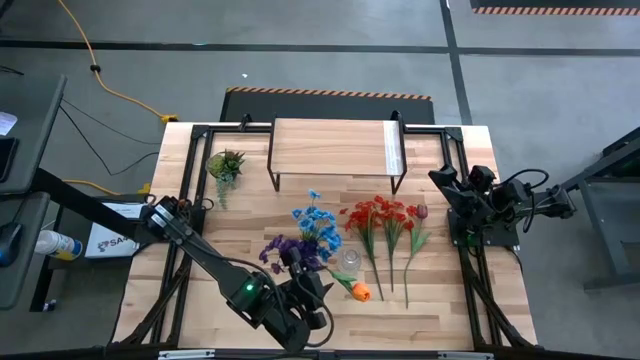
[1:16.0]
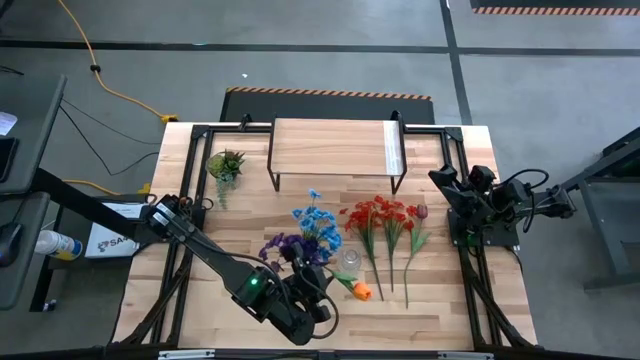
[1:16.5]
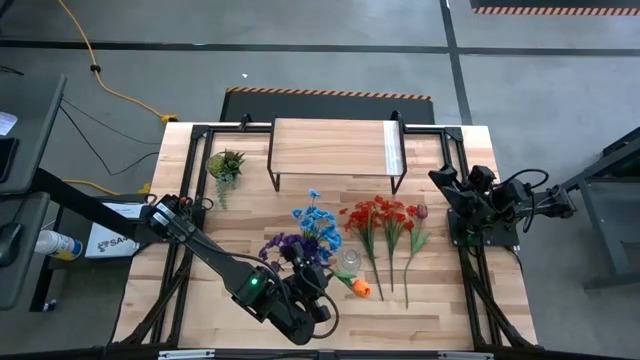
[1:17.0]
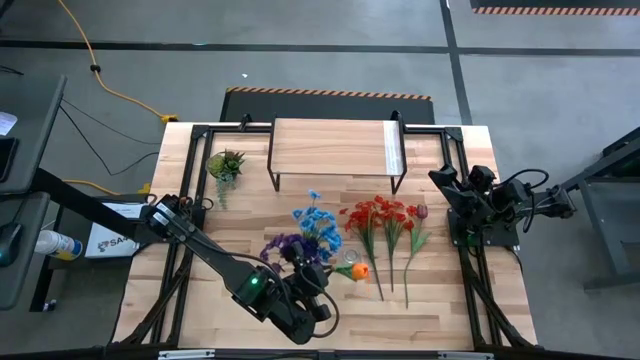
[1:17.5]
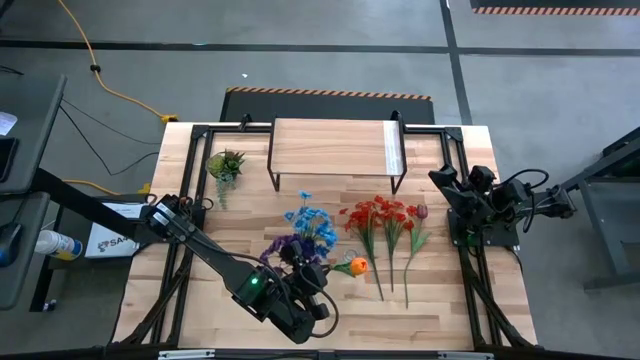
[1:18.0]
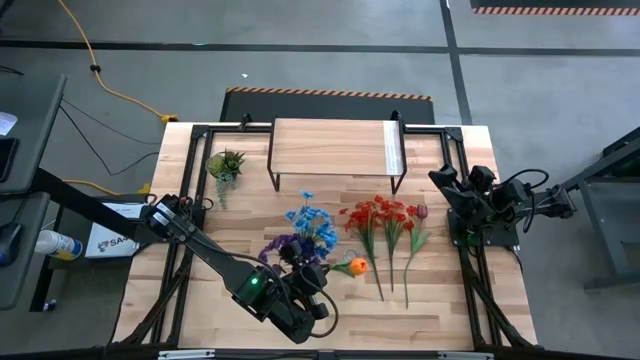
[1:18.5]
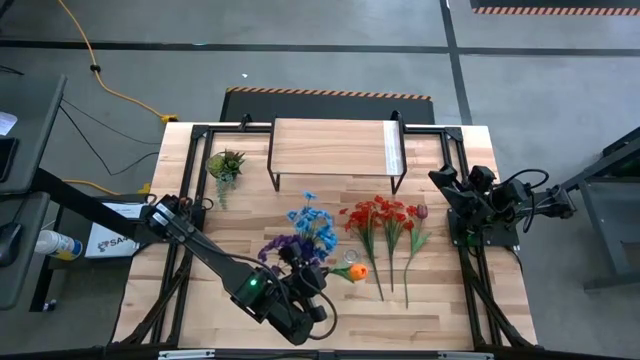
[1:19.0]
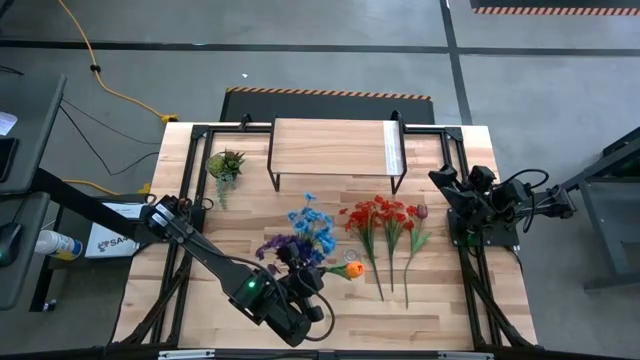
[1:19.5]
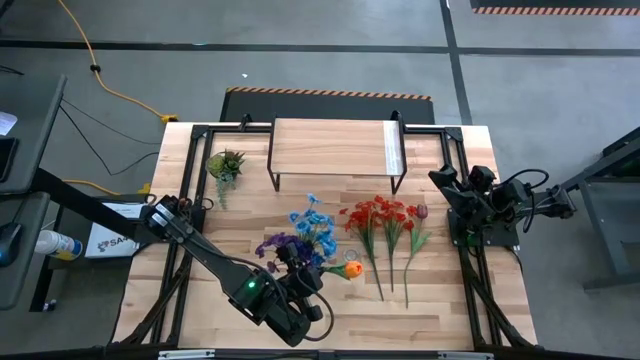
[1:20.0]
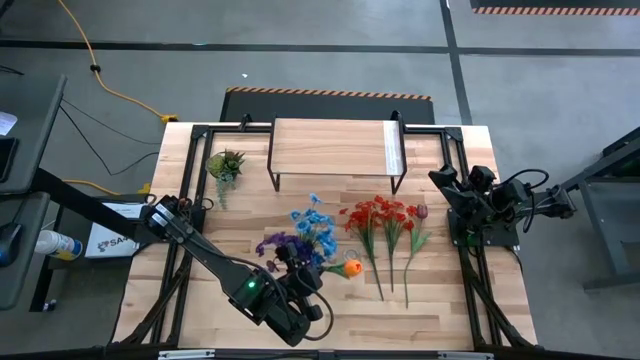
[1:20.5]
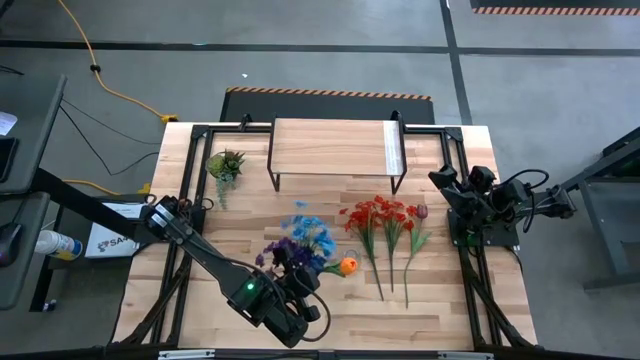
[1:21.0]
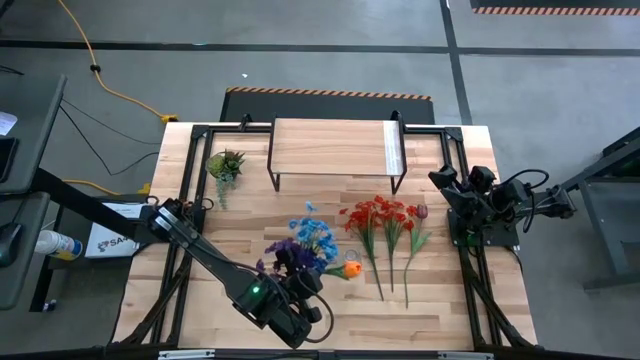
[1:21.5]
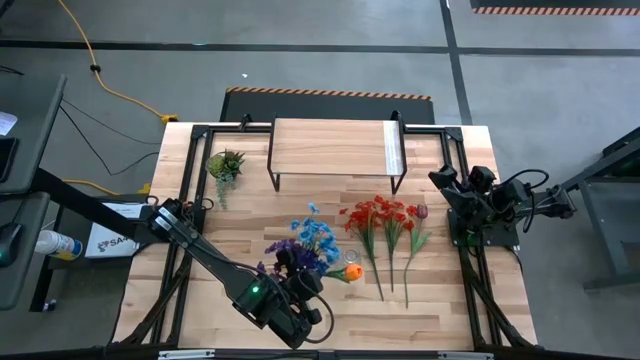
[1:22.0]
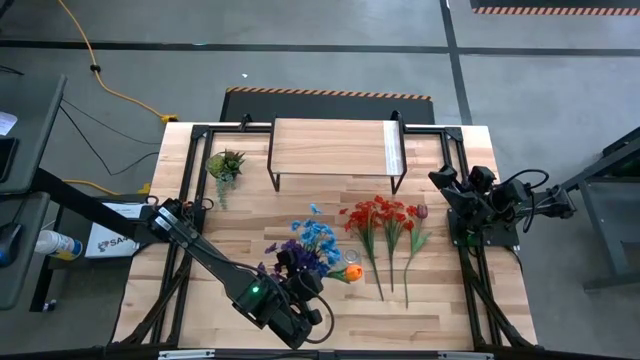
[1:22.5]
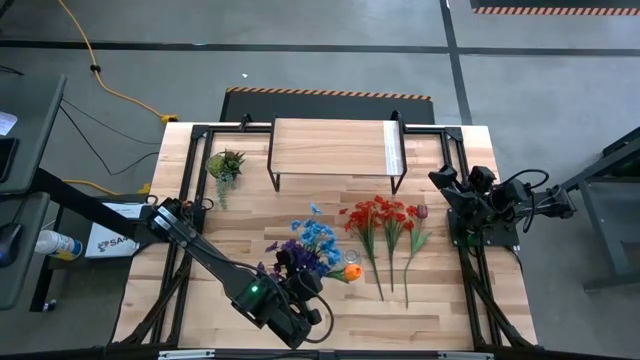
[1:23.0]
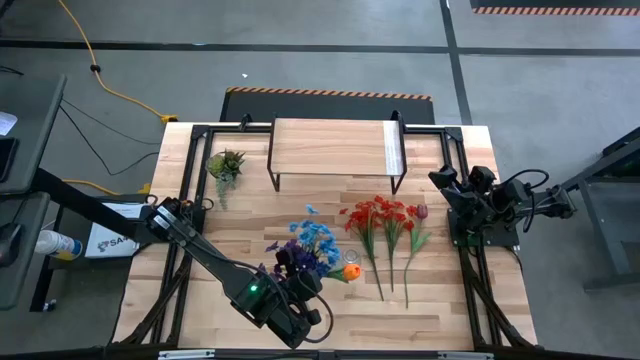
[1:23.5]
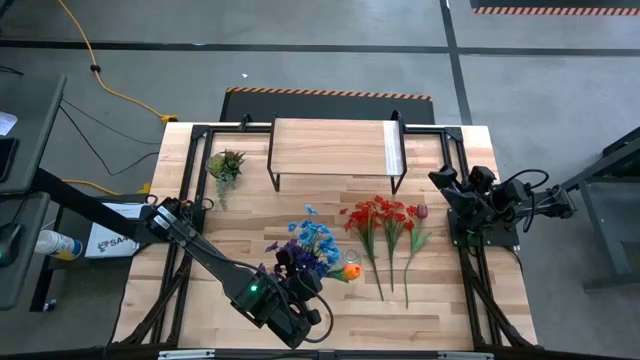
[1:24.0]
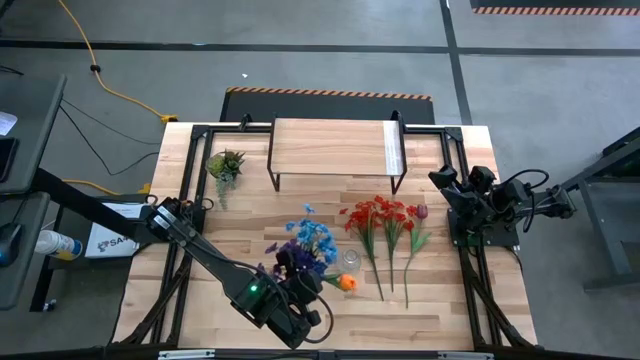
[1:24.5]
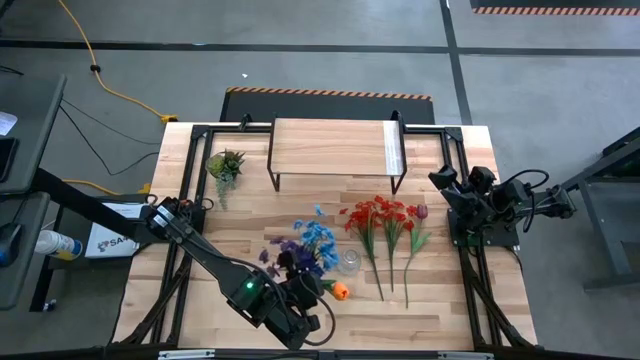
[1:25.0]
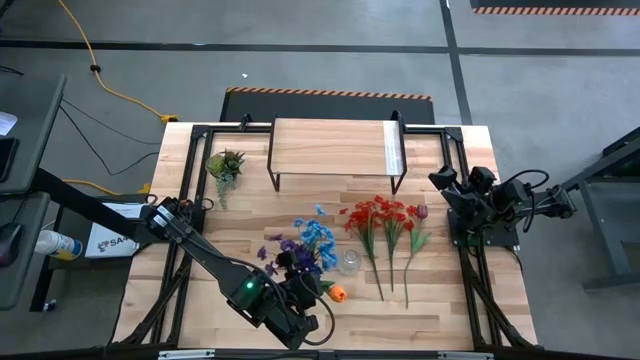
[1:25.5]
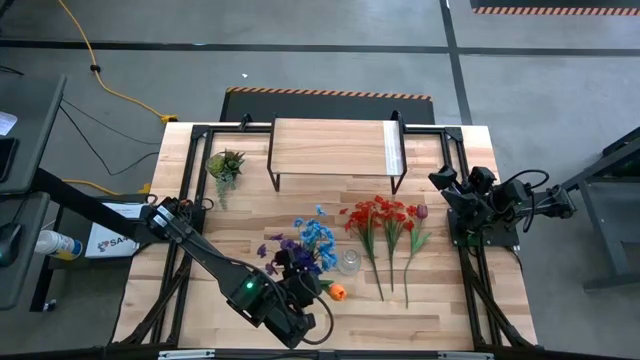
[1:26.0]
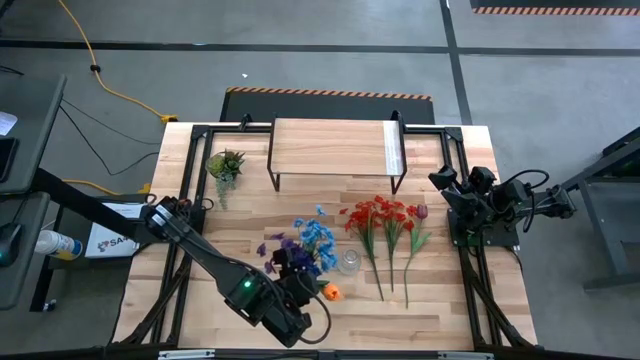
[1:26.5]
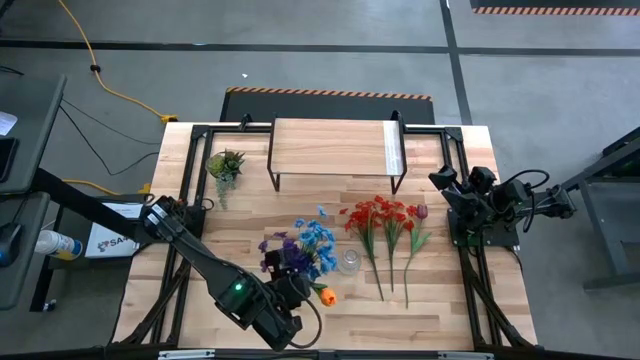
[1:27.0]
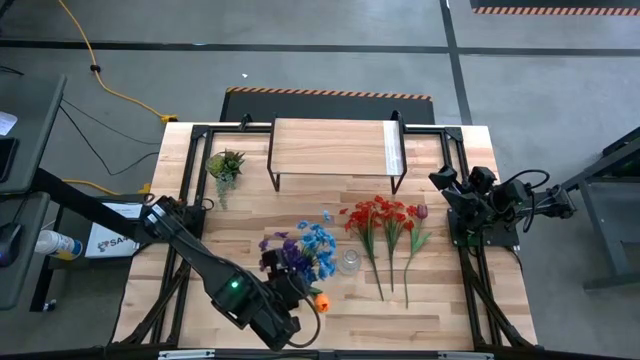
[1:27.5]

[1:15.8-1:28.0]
Task: Pick and place flowers into a vace then onto a shelf
Put the orange flower into the left transparent flower vase

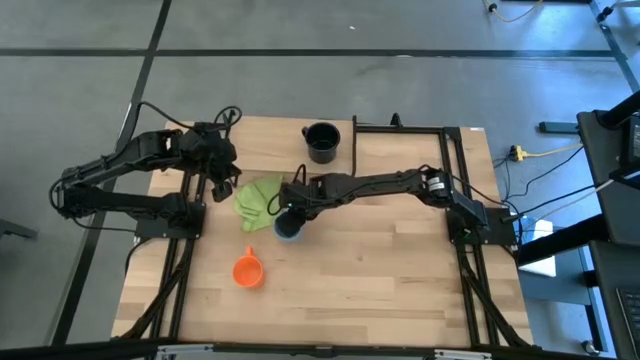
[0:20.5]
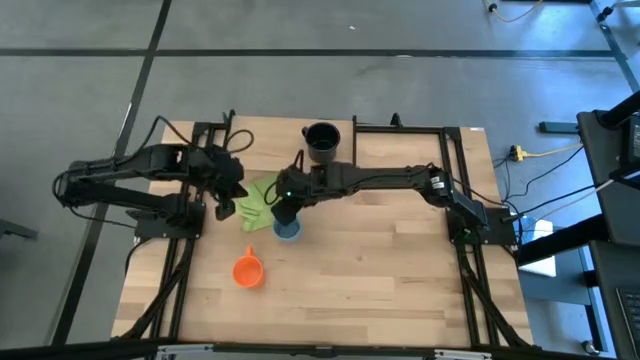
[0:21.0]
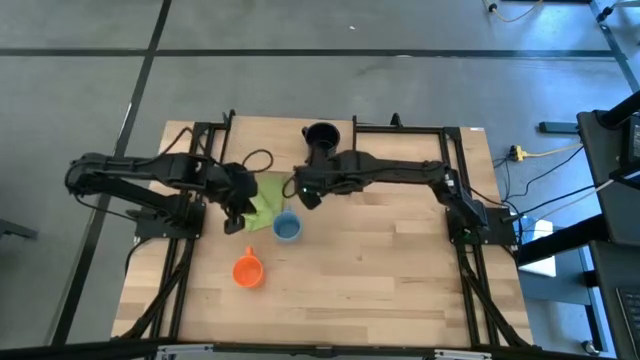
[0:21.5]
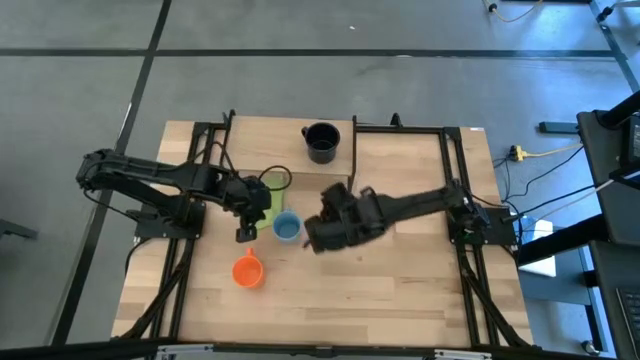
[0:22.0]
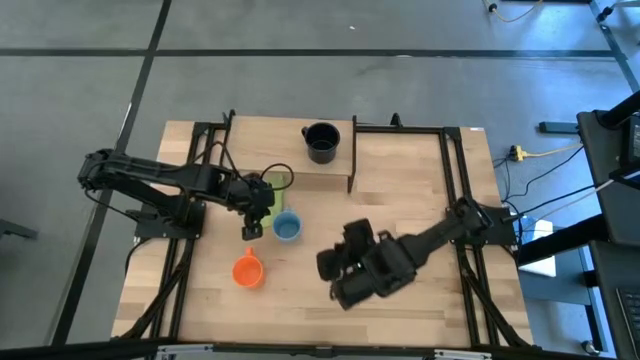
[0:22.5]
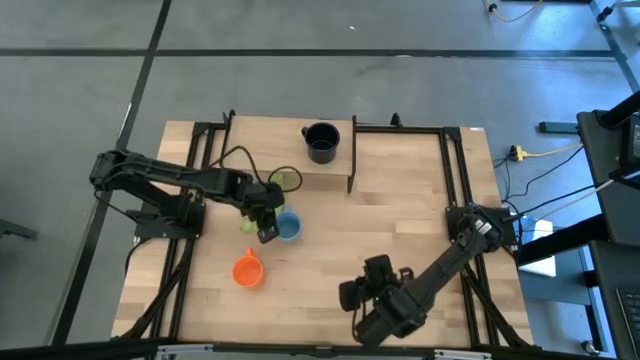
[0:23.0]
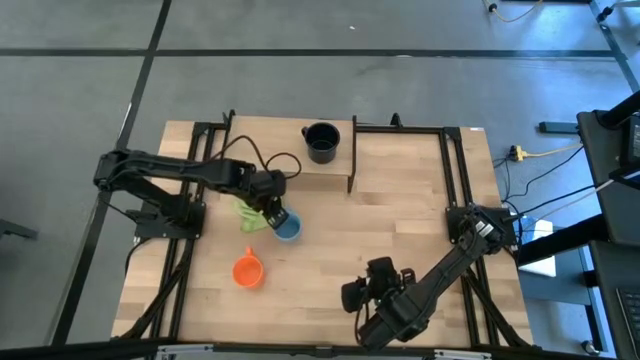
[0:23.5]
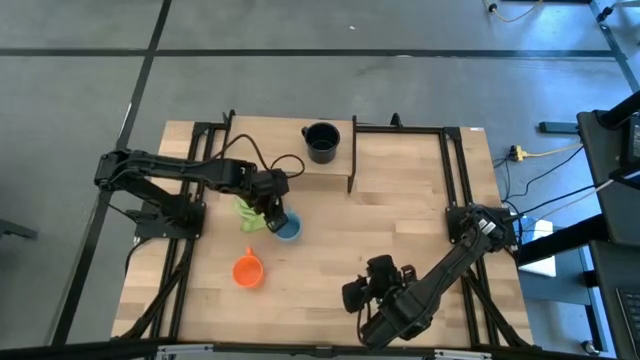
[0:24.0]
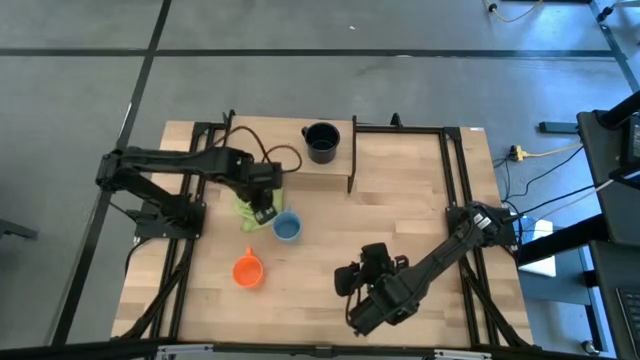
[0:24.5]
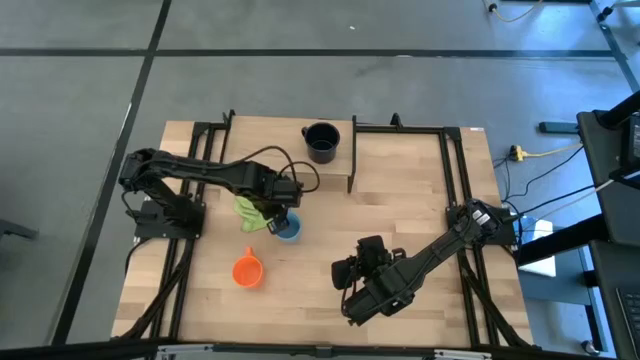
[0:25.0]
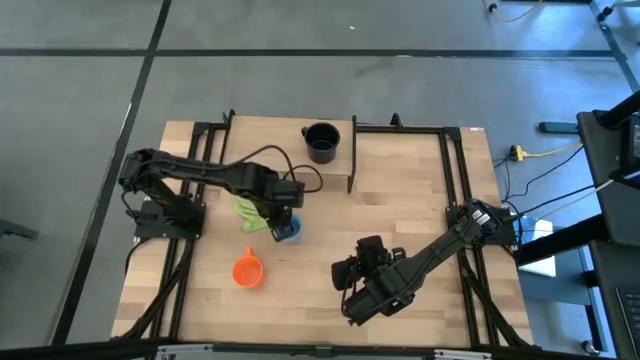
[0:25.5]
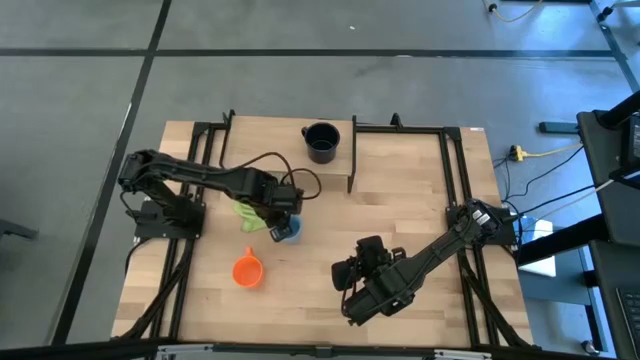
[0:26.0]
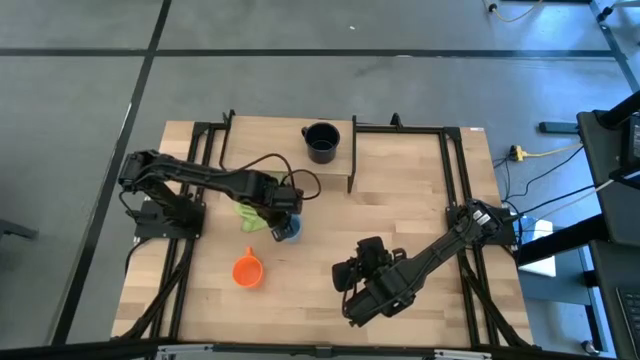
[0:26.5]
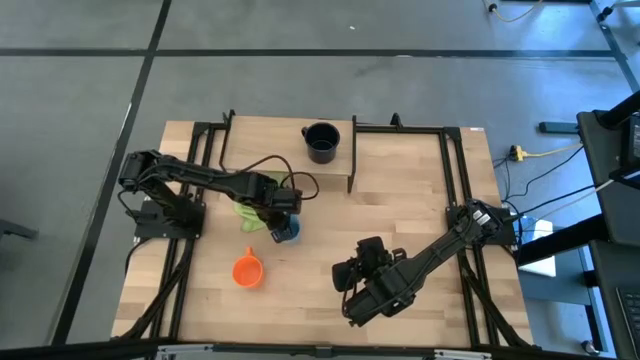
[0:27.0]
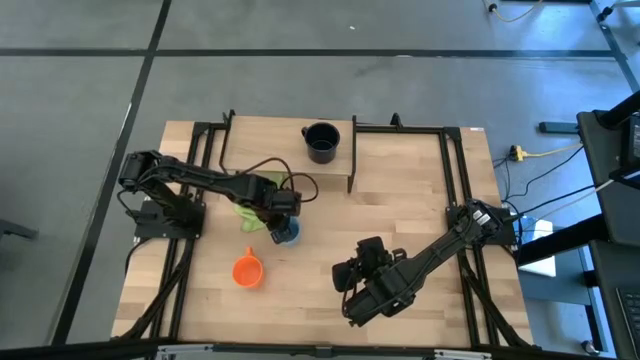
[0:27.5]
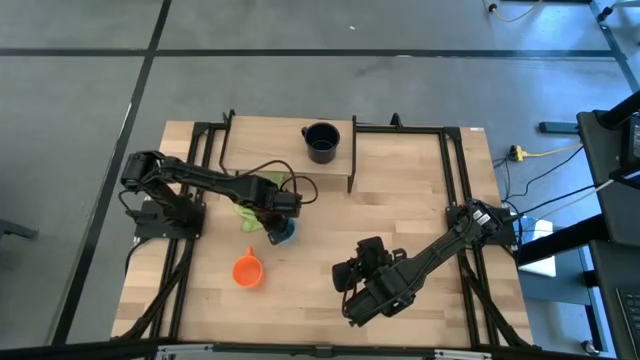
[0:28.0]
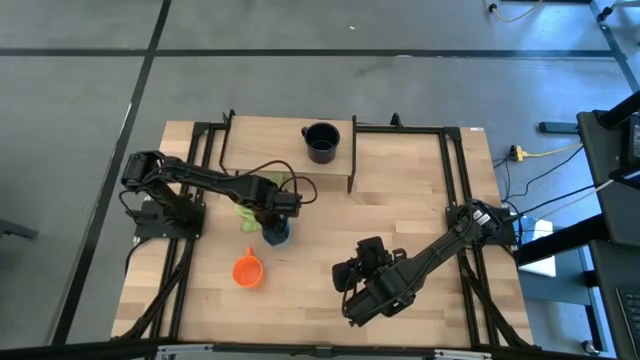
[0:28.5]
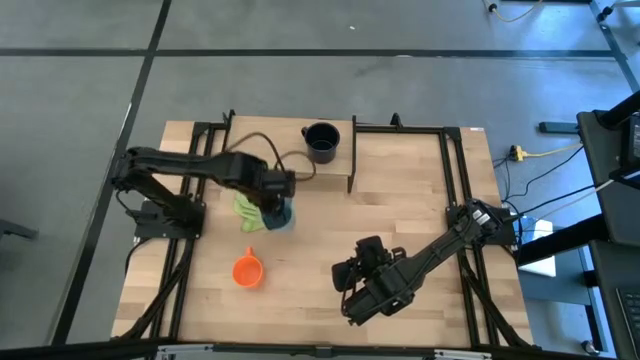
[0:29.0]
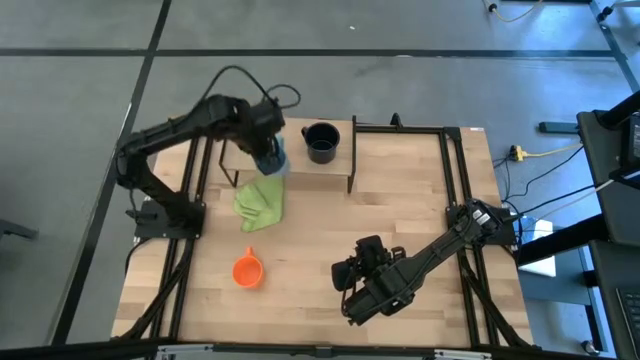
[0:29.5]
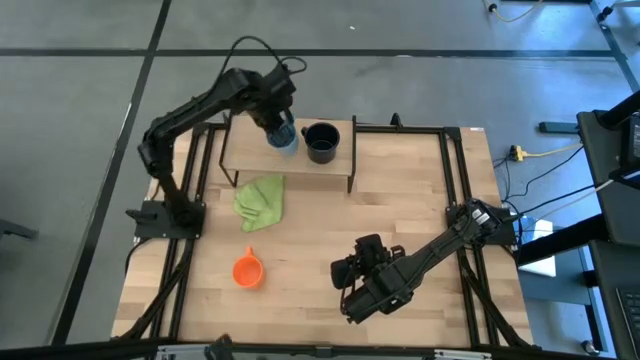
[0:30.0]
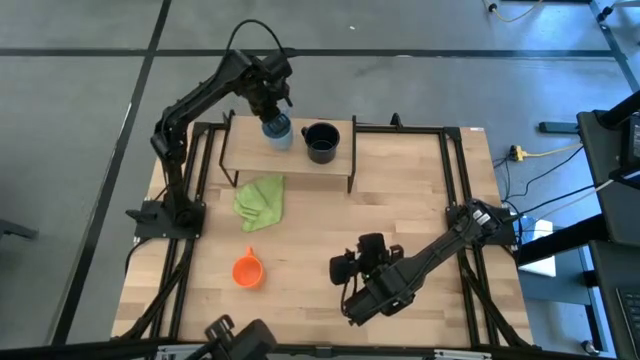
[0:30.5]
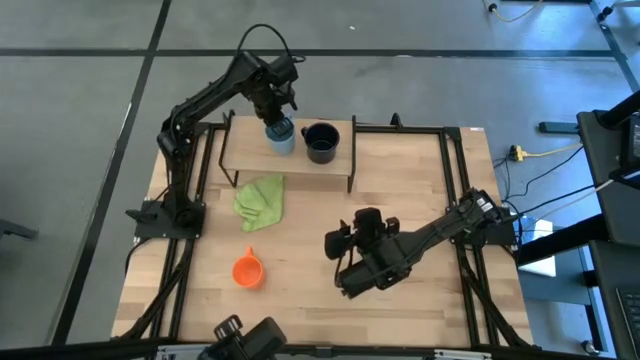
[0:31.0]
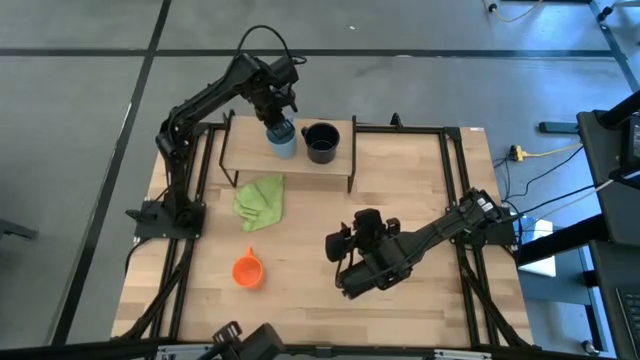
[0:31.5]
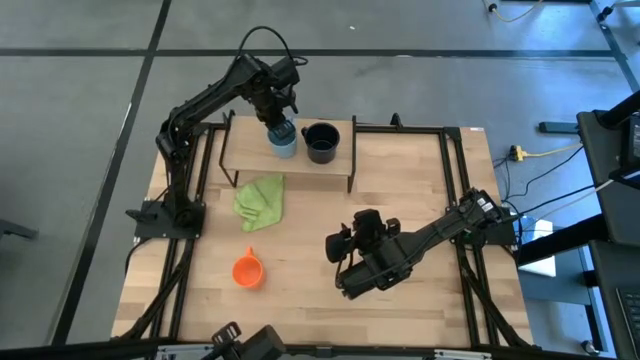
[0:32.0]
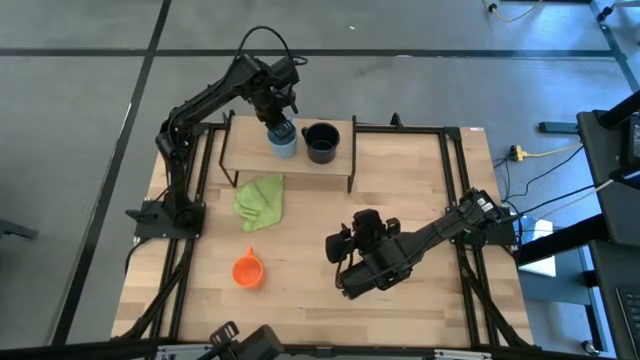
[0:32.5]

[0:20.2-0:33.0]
Task: Stack small to large cups/mugs on shelf
Put the blue mug on the shelf
